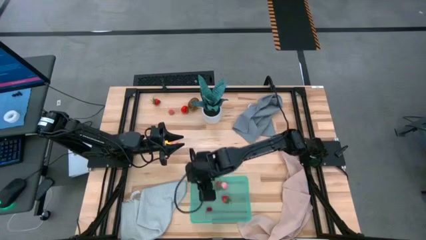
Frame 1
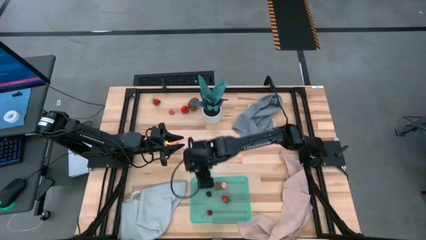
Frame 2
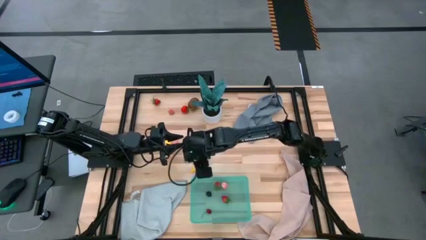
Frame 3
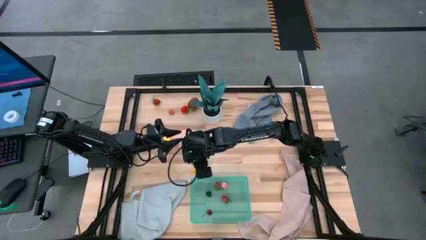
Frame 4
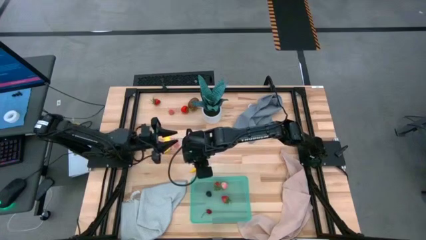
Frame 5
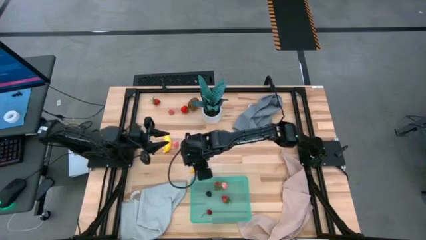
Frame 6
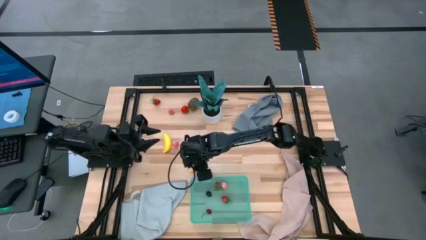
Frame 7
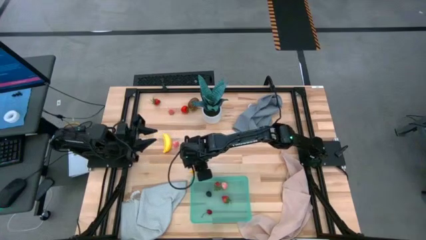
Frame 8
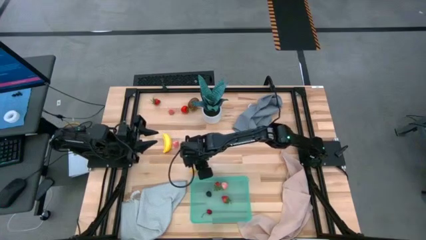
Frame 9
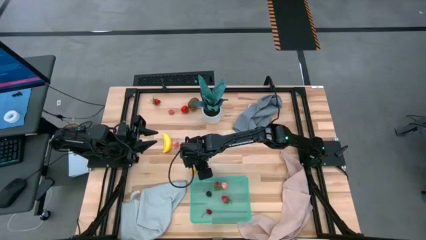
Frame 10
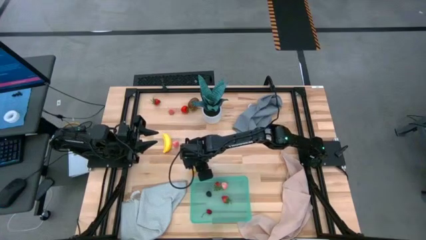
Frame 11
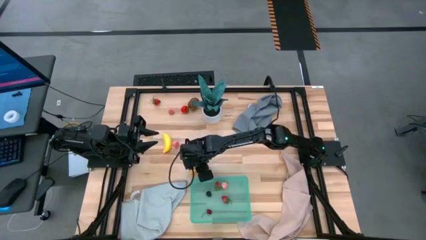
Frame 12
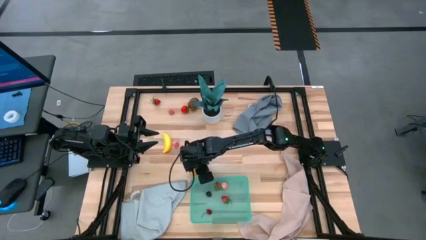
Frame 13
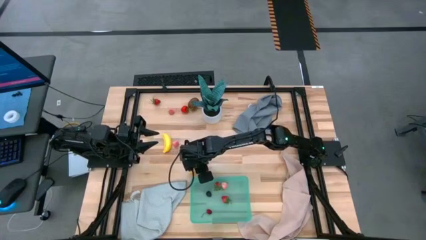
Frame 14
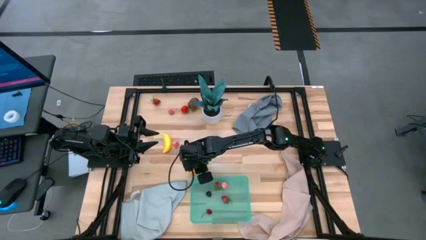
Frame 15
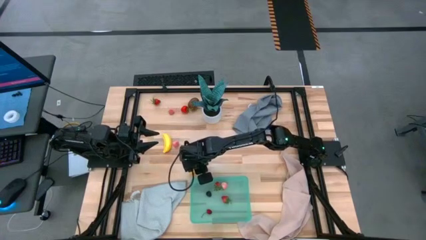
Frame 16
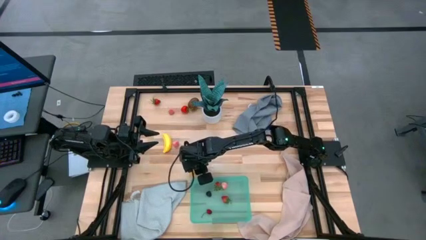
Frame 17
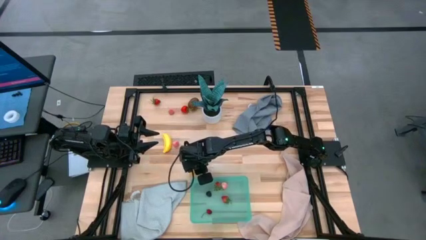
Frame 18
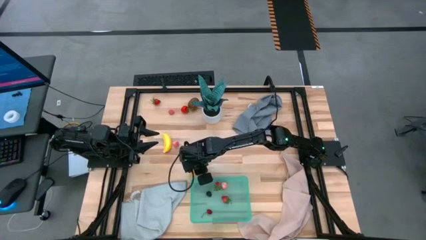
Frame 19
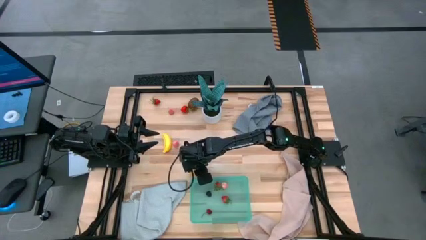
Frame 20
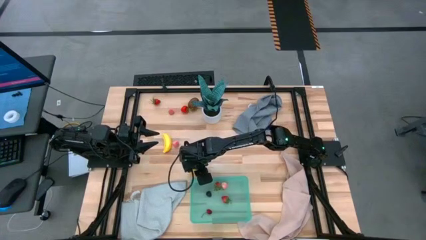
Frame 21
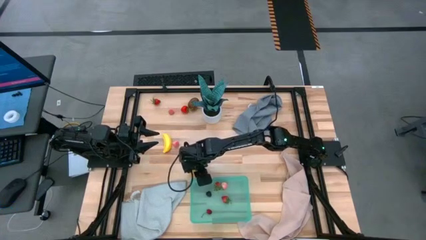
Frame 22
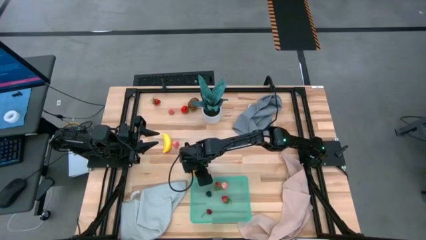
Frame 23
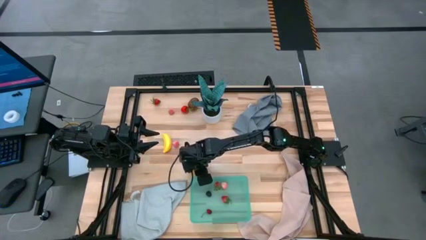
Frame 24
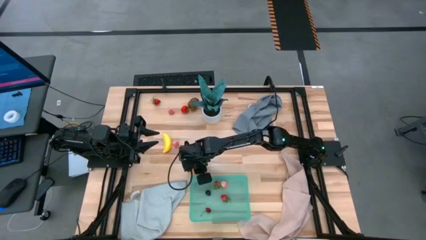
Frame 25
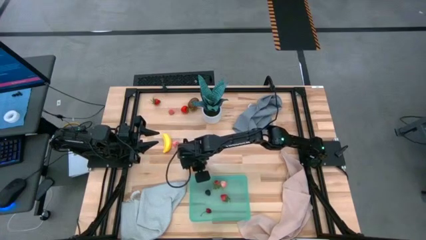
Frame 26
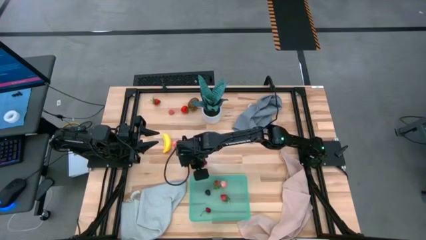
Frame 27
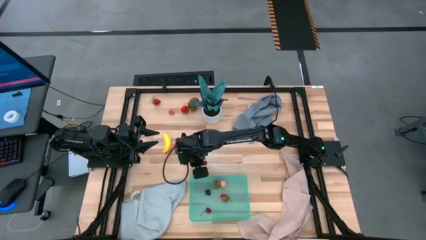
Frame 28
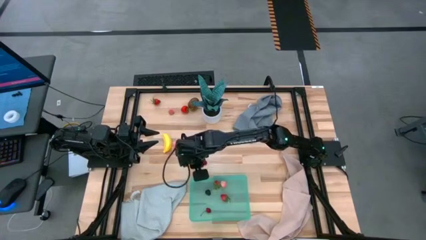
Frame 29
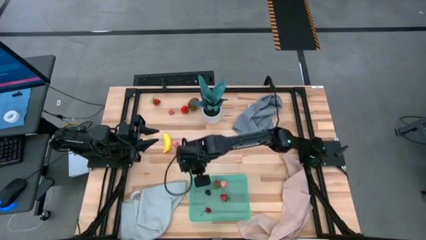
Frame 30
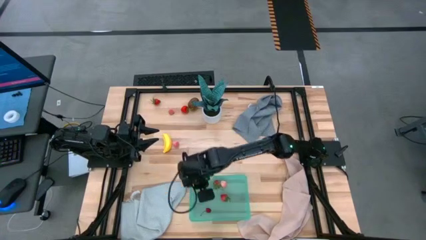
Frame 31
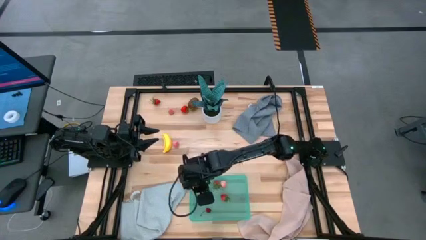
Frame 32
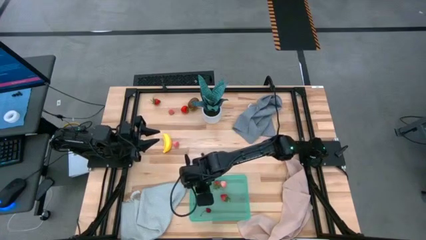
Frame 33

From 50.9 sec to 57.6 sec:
Task: Pick and placing Produce into tupperware
Put the yellow chili pepper into the green bin

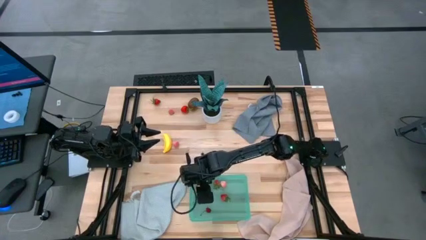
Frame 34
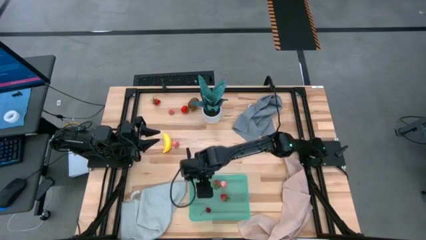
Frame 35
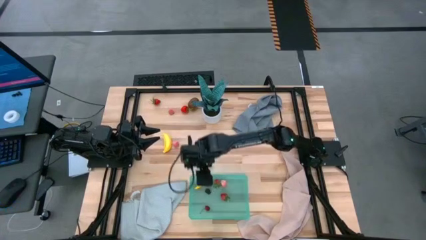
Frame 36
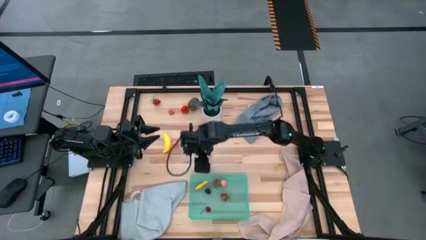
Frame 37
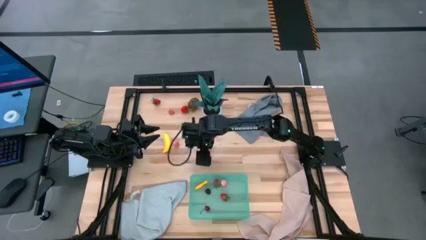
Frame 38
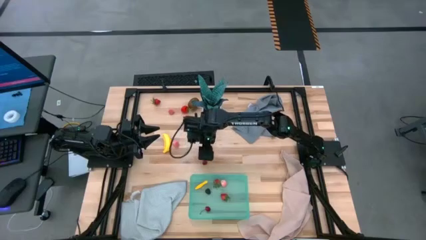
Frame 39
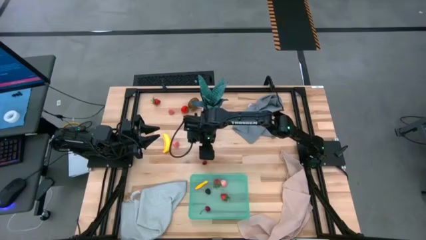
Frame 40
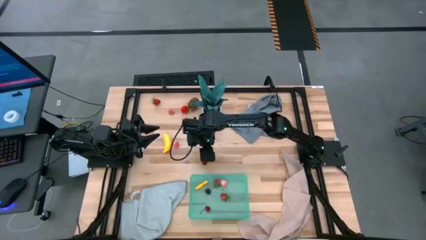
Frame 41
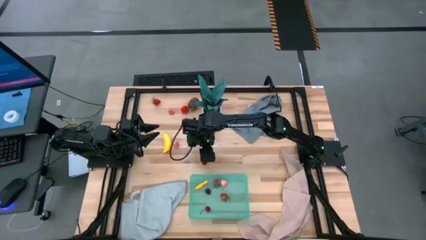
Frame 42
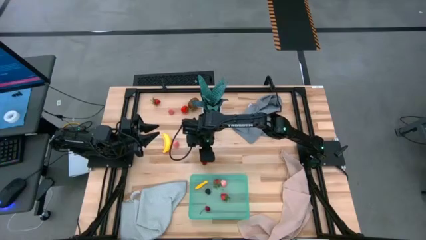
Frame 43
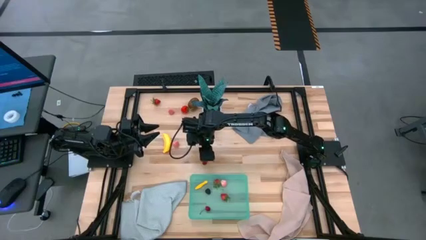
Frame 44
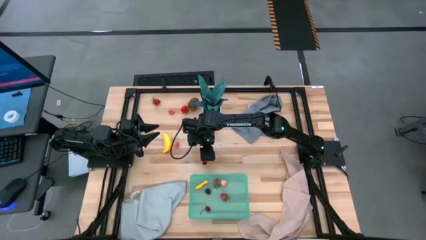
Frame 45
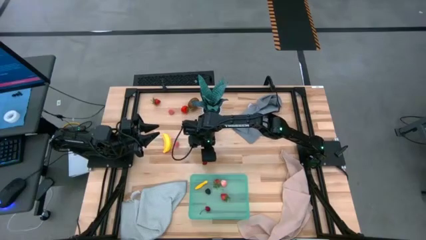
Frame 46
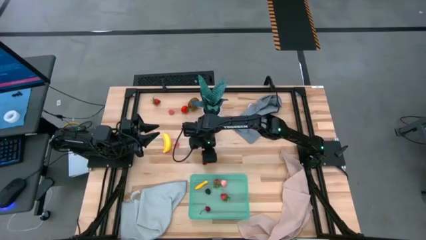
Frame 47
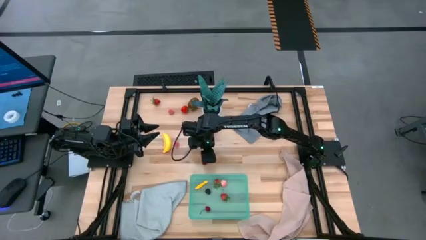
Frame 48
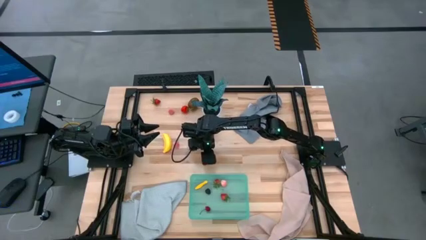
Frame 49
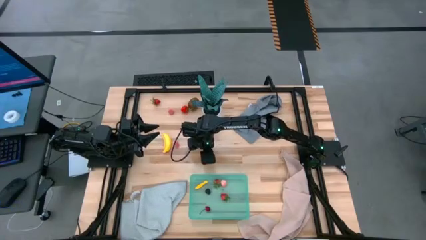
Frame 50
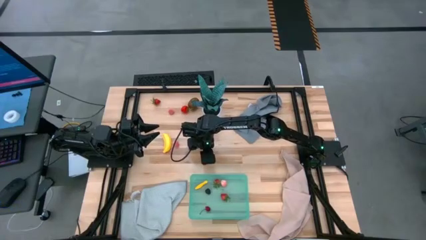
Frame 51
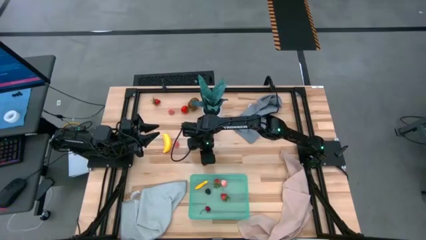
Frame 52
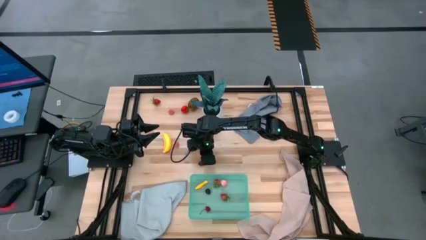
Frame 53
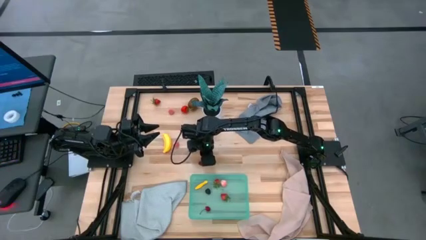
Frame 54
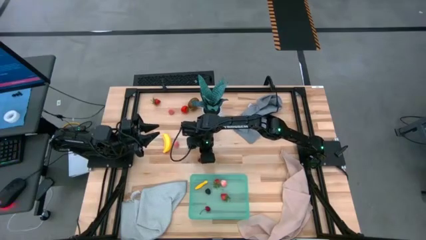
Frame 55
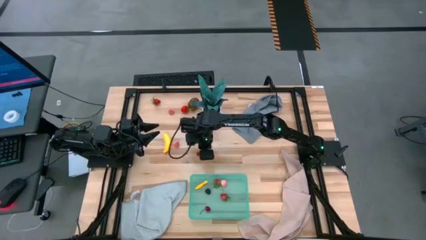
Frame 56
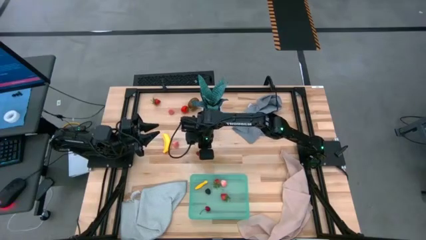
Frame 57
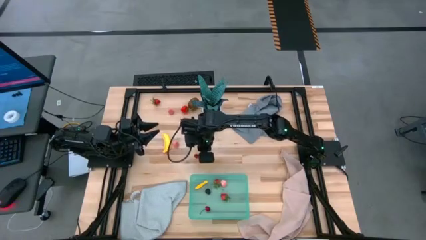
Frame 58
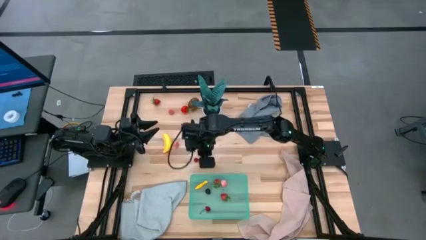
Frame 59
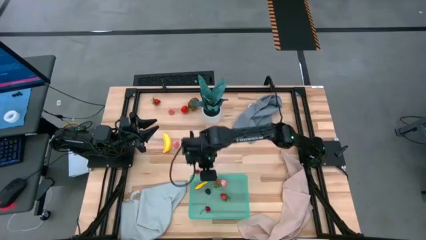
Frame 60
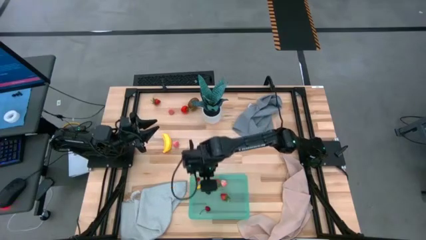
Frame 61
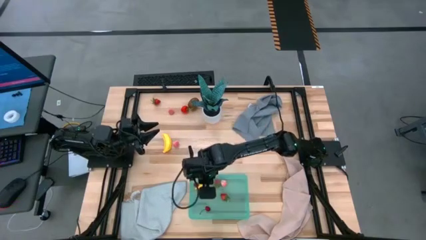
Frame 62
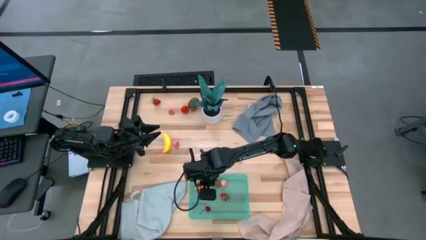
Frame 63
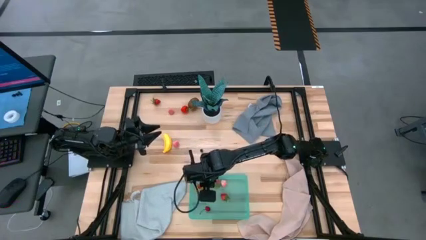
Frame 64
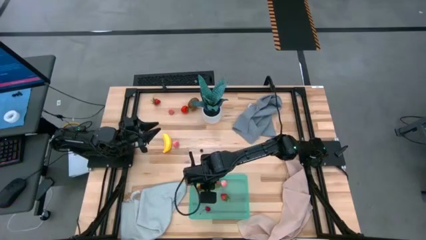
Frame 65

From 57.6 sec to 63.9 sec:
Put the red cherry into the green bin
